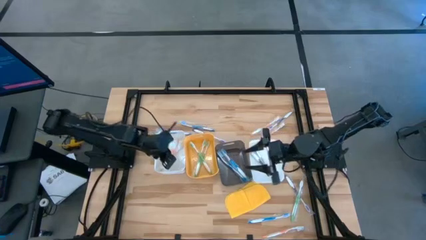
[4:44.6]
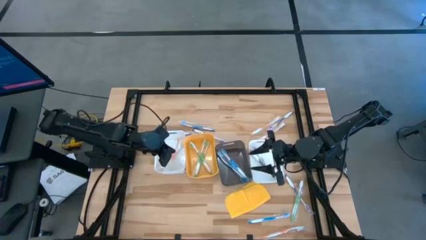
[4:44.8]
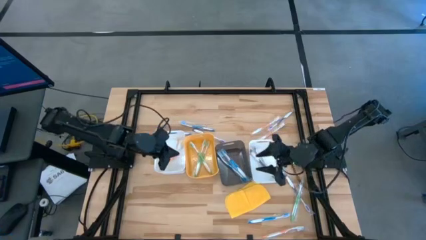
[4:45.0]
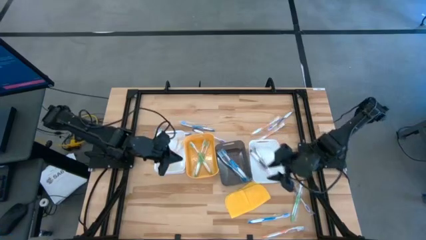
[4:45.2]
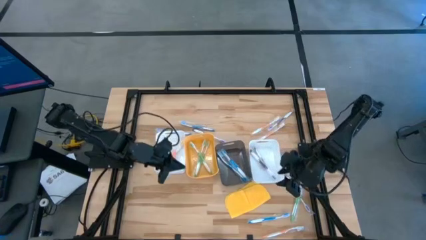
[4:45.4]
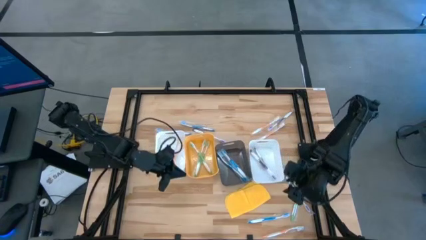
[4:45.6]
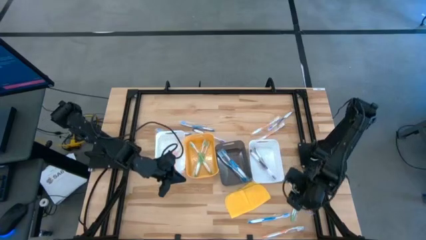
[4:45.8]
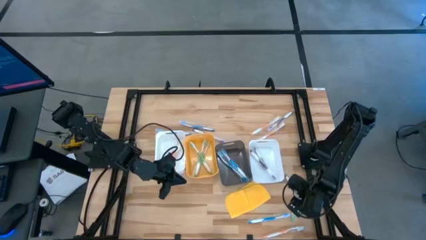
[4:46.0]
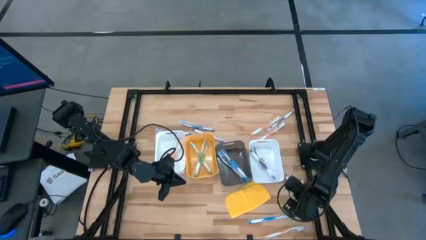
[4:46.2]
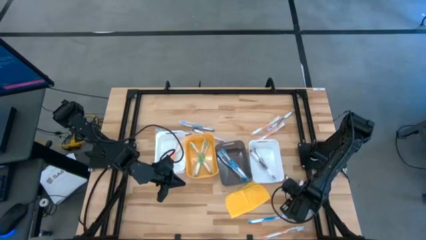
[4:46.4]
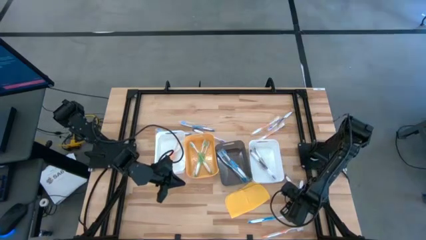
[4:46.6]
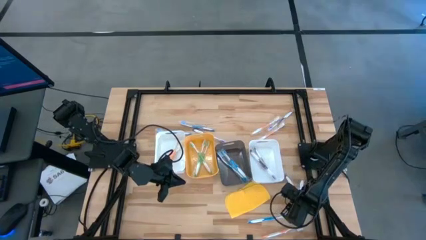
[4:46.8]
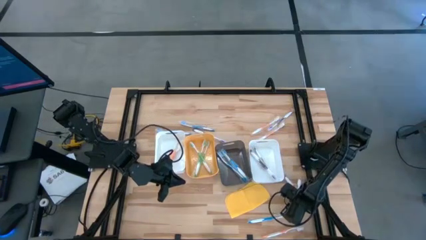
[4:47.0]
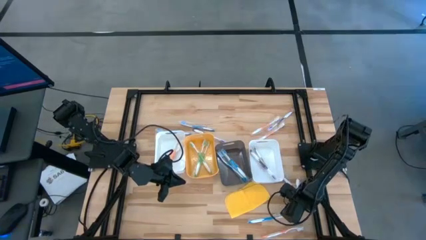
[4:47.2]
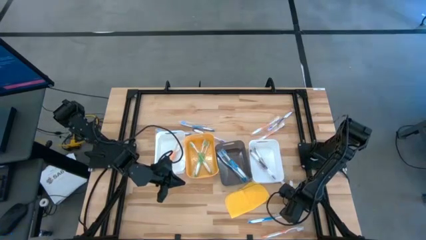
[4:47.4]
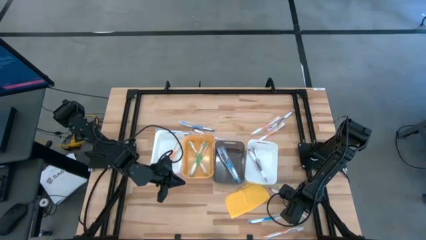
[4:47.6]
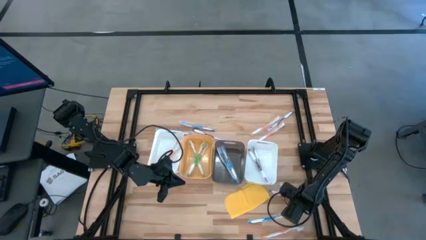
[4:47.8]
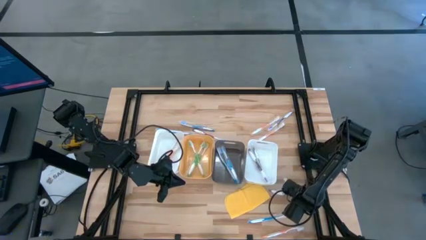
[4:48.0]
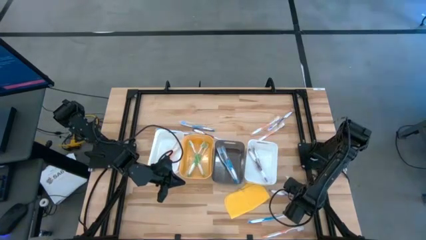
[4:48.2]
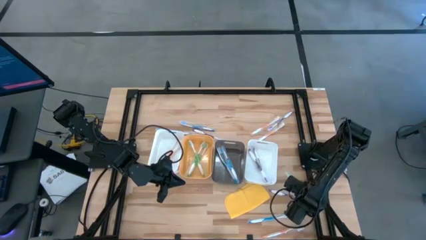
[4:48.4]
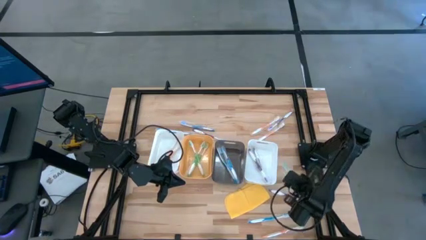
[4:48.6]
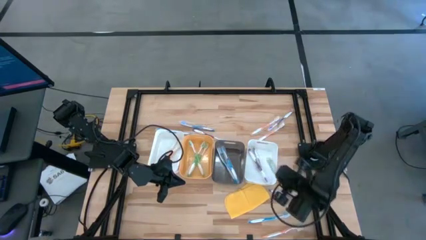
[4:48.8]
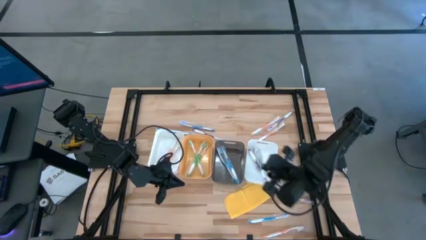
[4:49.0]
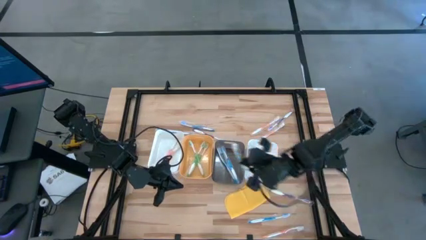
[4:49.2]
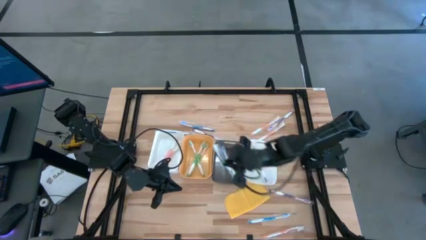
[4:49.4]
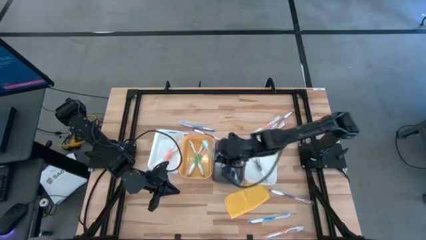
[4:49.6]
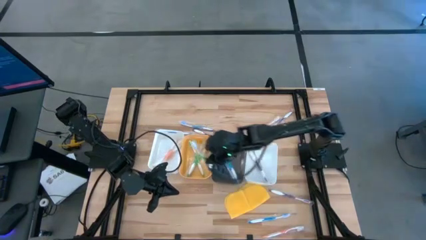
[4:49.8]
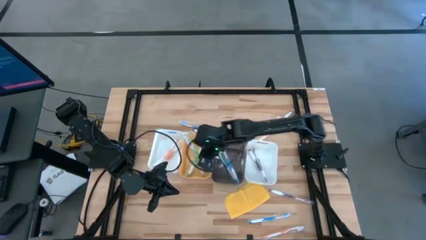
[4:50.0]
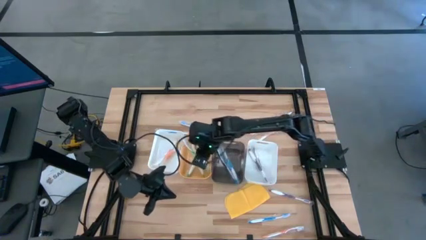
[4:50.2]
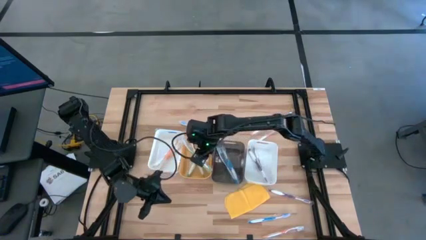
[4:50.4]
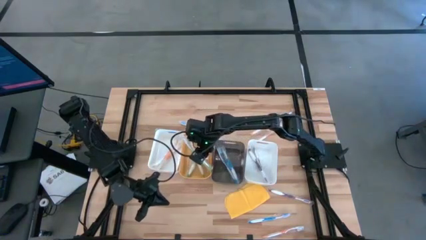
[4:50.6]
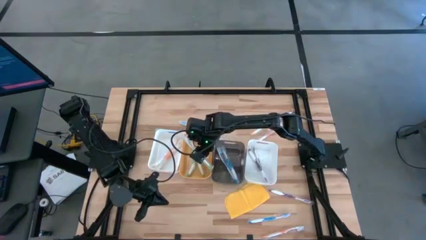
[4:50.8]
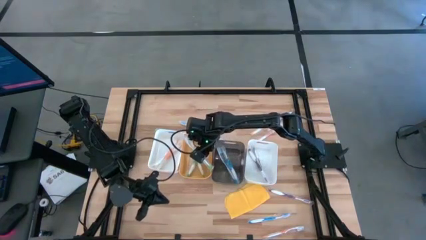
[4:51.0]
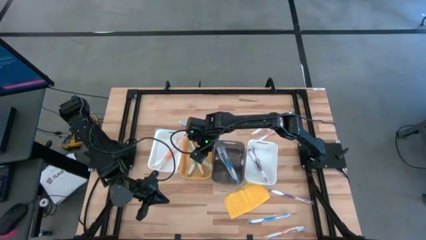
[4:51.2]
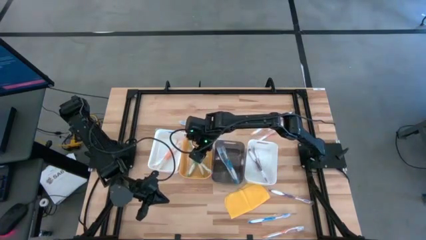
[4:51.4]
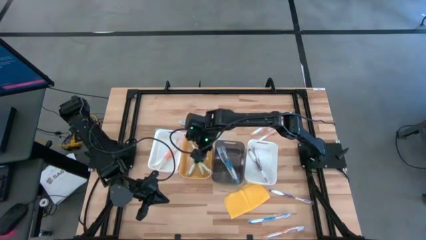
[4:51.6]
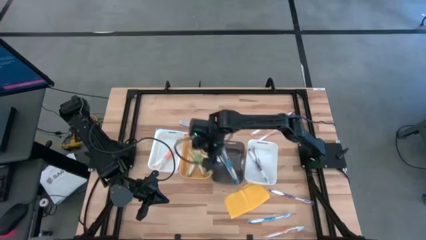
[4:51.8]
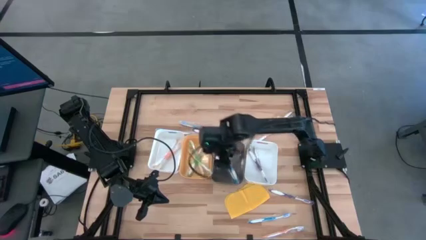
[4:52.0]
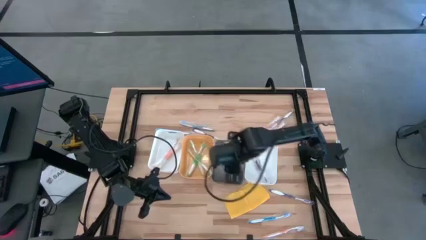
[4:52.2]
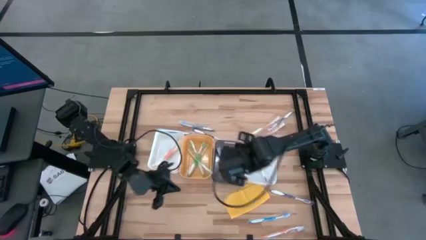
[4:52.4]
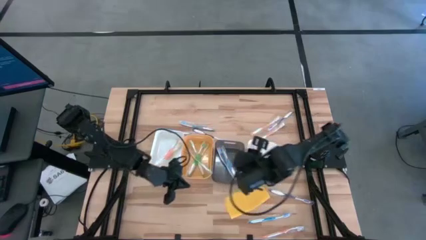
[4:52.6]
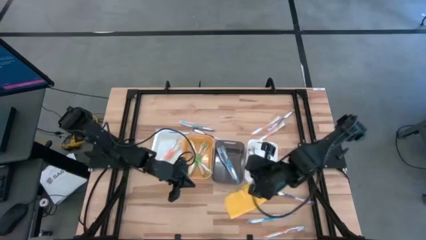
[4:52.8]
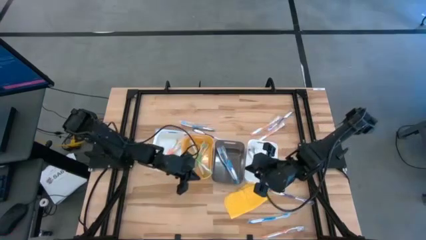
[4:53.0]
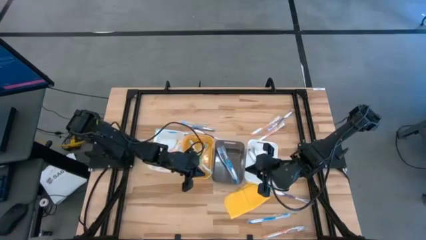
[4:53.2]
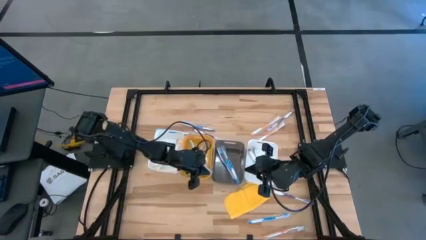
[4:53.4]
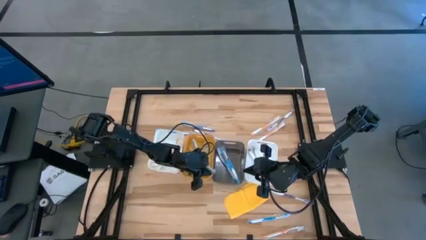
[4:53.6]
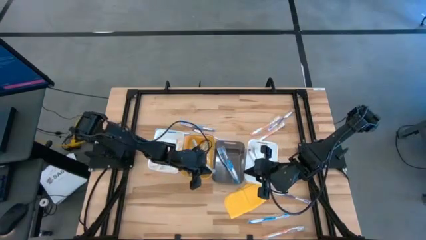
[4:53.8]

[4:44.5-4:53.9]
Task: Pick & Place Toothbrushes
Put the green toothbrush into the yellow bin

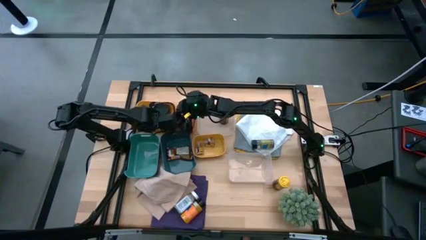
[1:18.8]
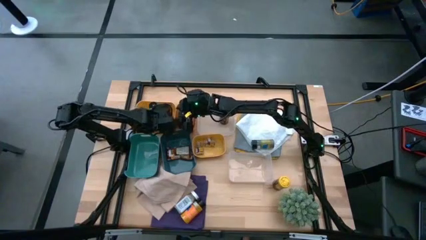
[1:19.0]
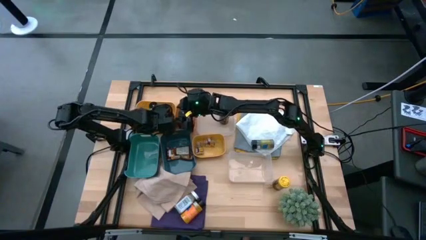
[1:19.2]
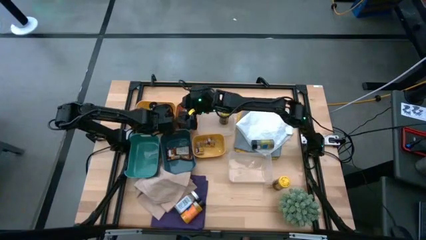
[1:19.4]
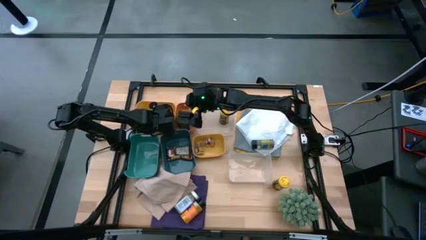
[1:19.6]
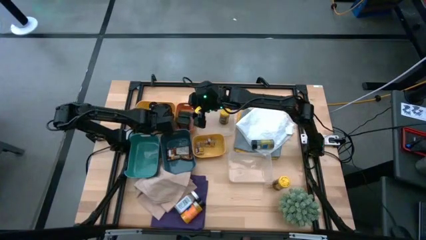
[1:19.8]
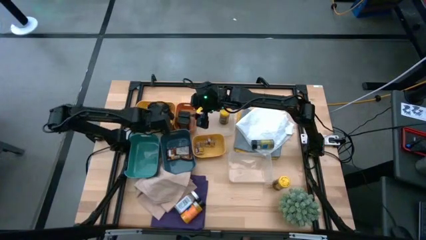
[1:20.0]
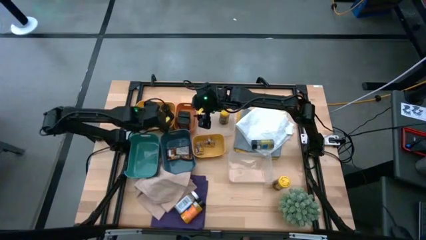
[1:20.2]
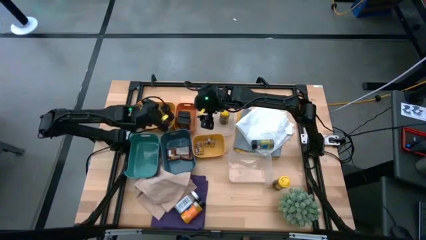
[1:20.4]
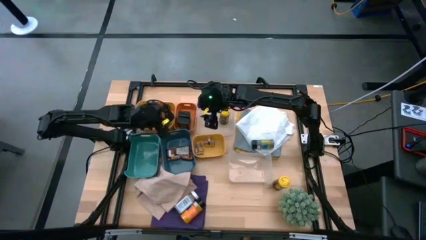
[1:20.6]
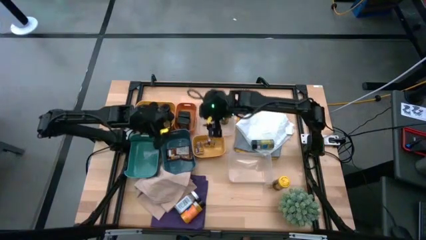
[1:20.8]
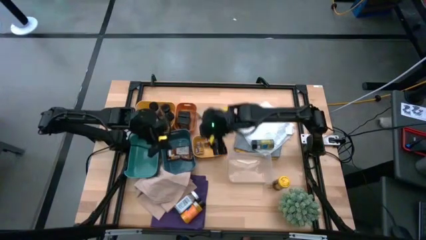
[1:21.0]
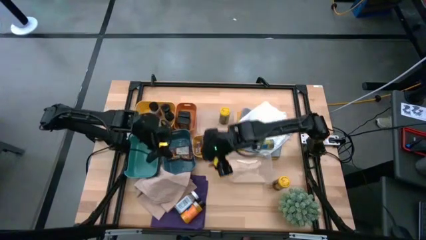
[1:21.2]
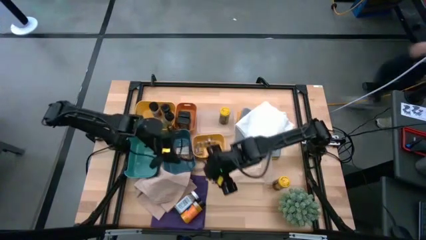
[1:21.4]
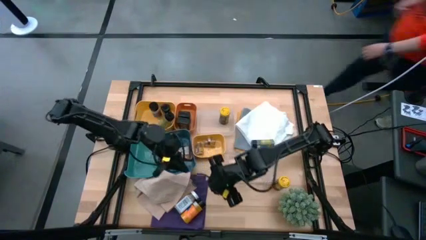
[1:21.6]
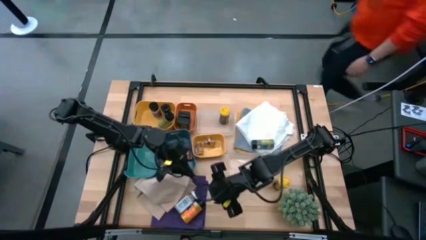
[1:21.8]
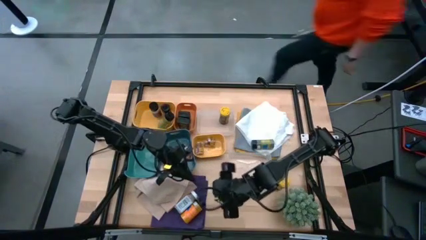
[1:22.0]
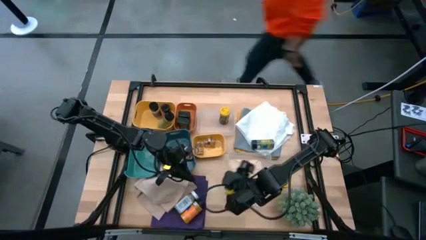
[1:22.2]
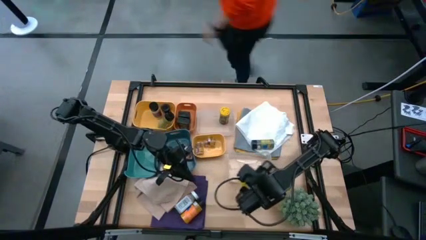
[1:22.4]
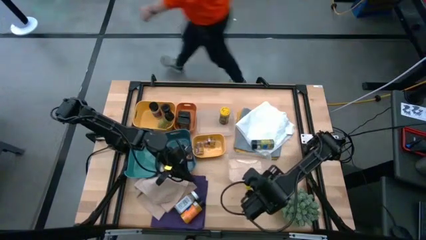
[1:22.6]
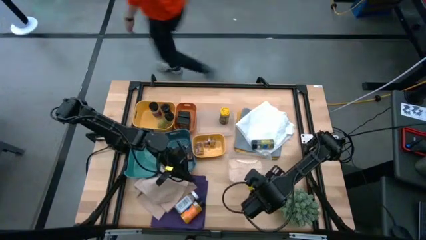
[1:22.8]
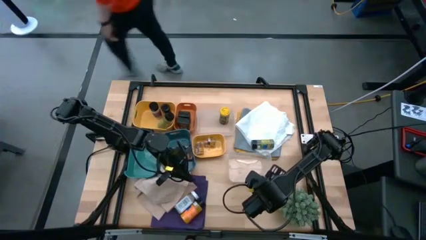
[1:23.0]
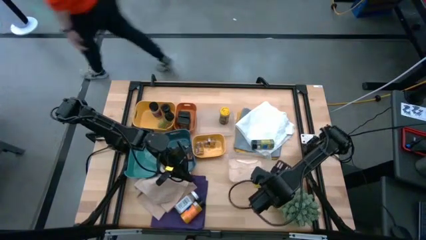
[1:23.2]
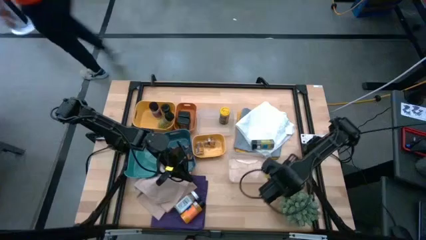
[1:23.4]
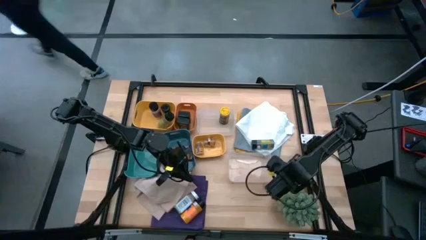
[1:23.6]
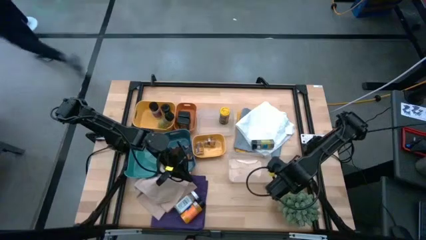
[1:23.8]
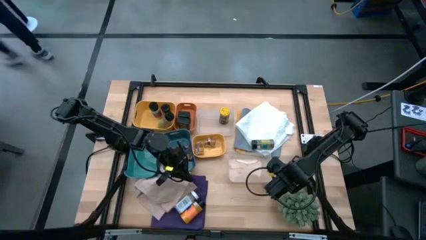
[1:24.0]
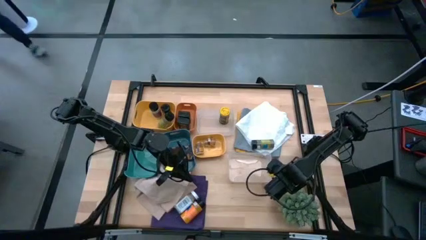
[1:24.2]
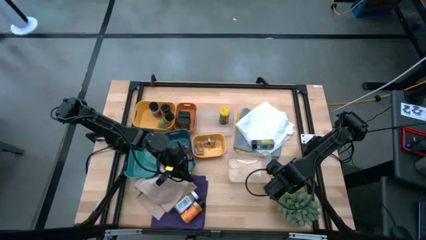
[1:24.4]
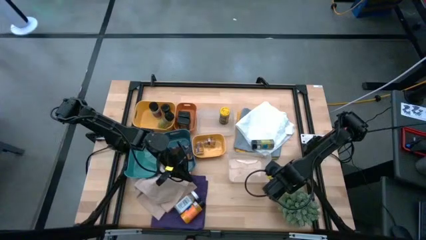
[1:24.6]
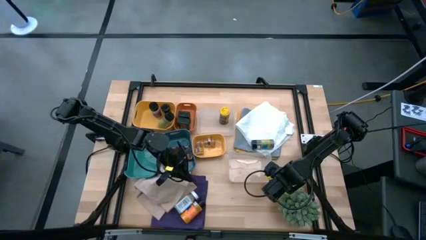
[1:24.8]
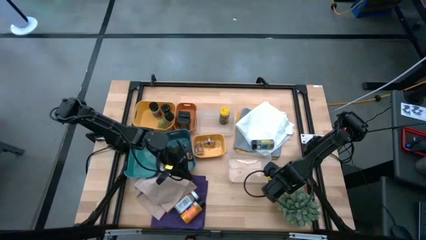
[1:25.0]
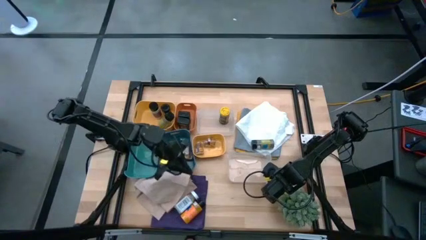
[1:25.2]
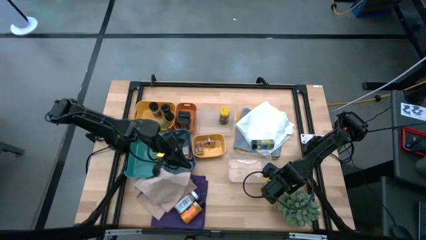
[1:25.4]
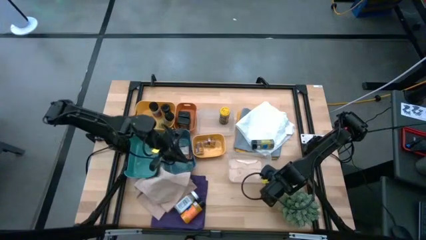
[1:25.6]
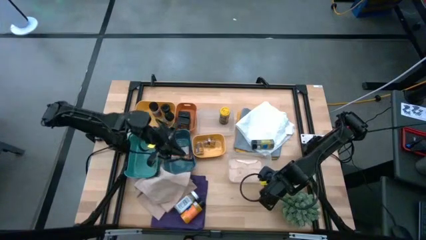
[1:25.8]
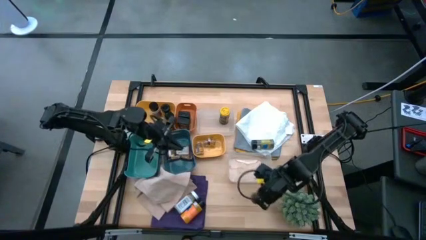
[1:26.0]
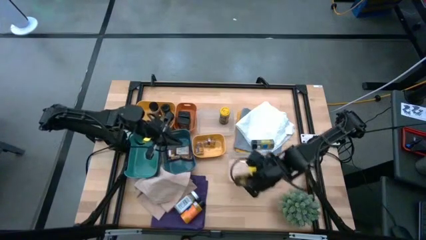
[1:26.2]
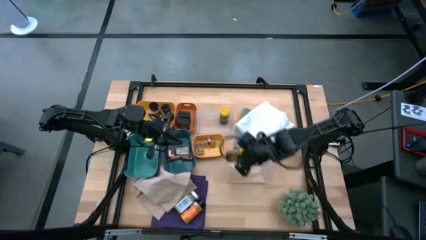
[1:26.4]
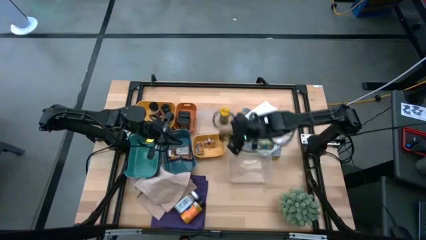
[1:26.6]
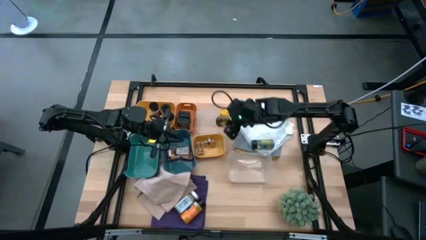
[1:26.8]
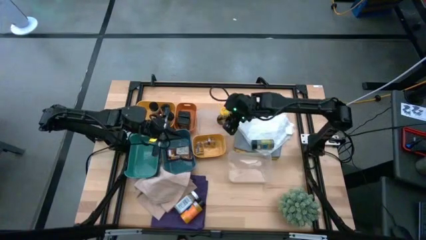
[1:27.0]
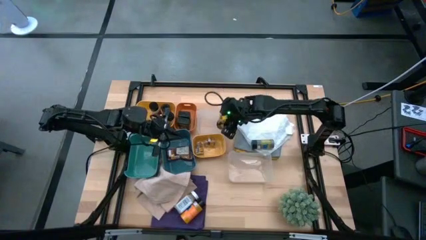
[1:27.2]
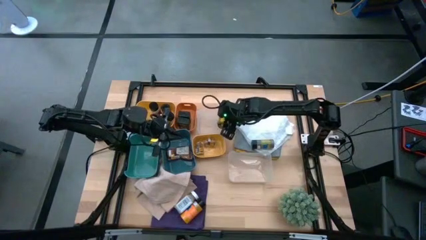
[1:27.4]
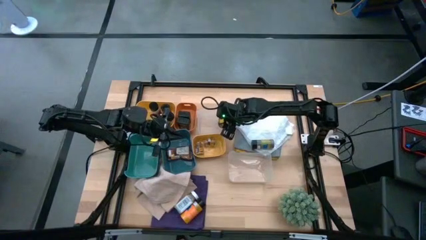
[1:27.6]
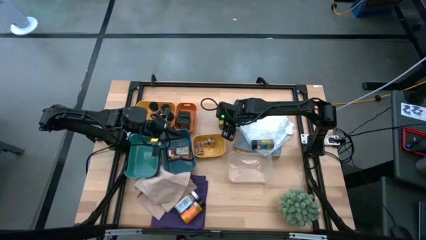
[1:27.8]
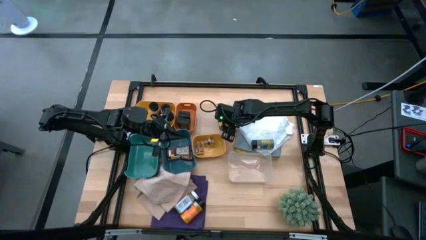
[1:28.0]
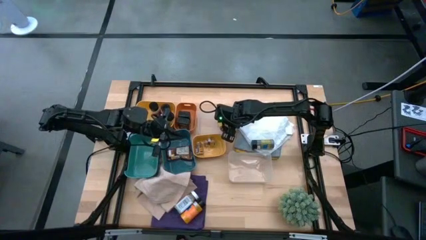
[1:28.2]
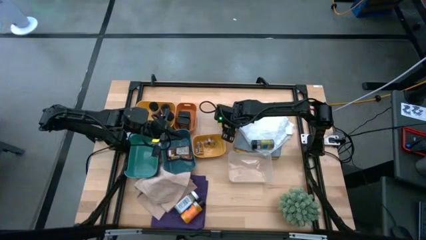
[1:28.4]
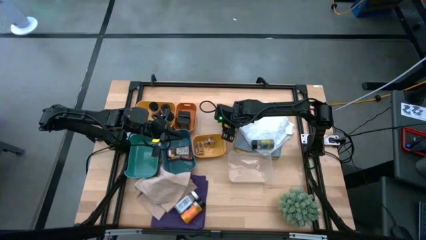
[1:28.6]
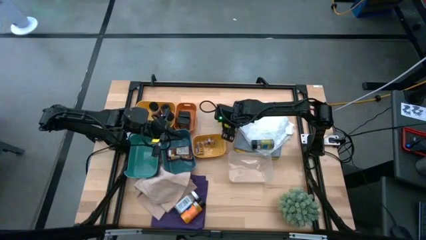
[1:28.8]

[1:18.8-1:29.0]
Task: Sort spices by type
Put the yellow spice bottle into the top transparent bin
